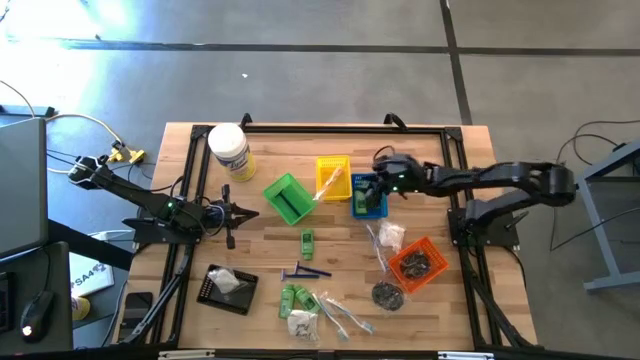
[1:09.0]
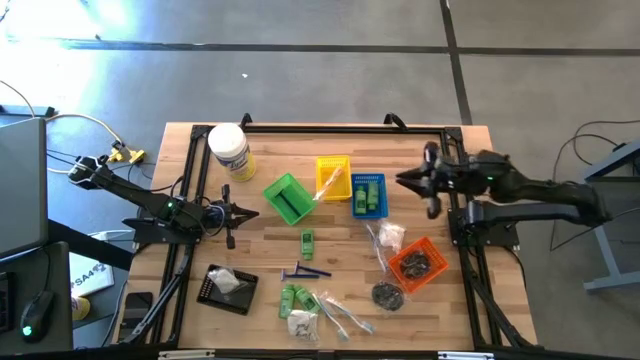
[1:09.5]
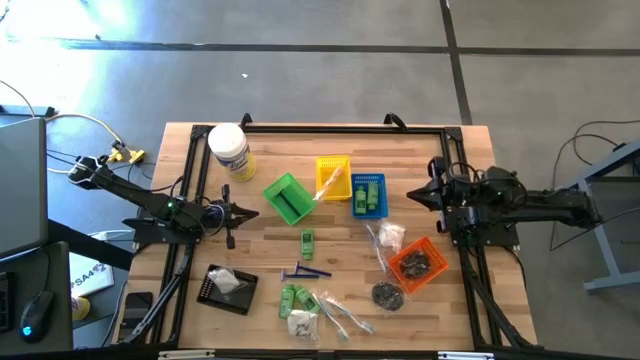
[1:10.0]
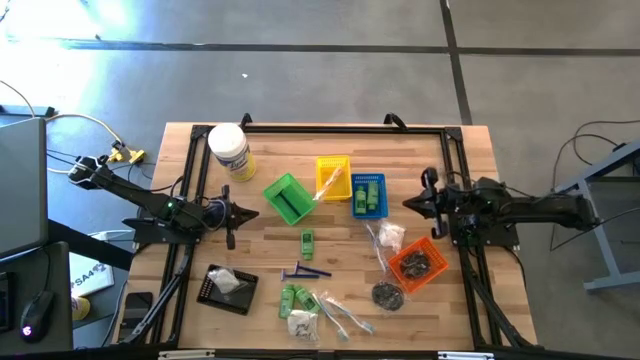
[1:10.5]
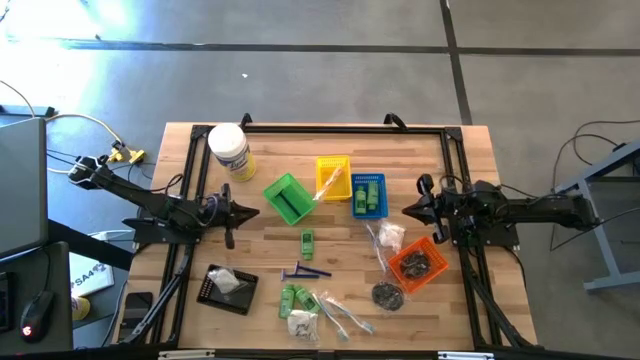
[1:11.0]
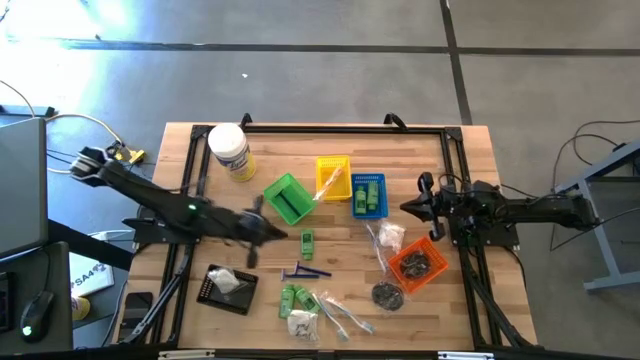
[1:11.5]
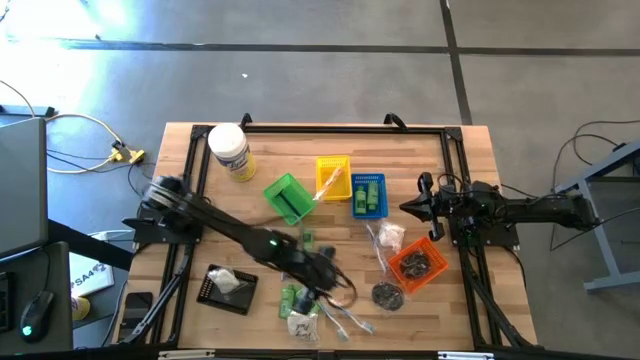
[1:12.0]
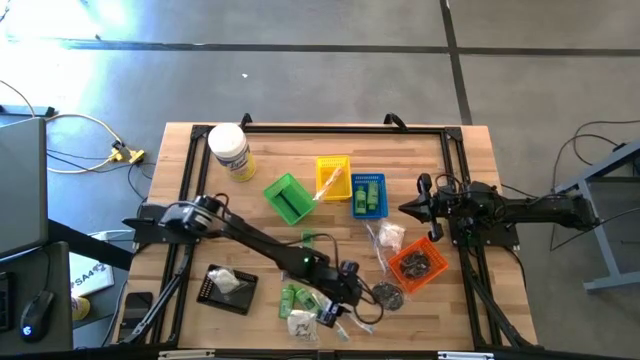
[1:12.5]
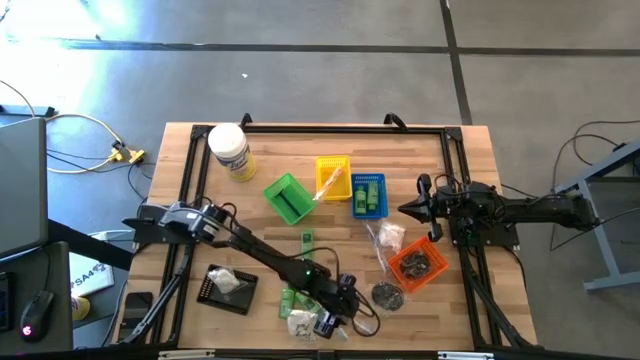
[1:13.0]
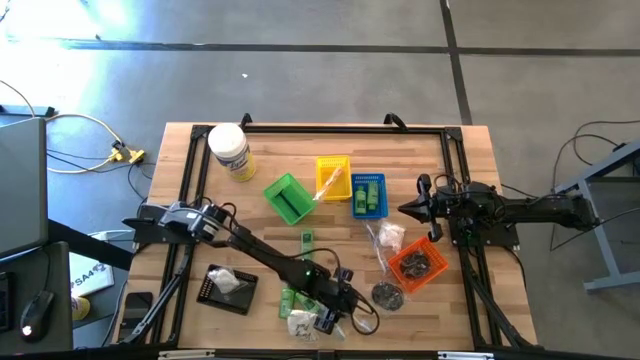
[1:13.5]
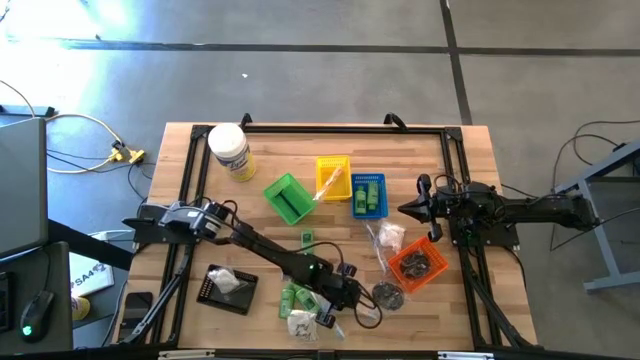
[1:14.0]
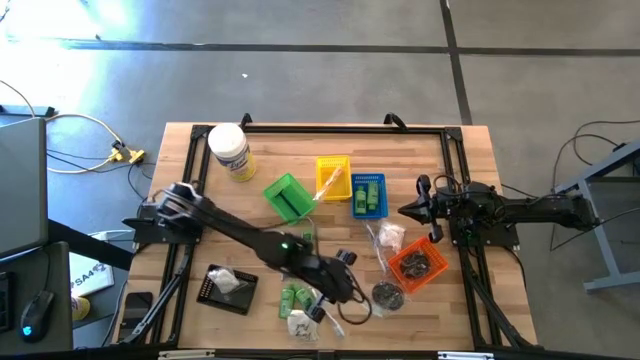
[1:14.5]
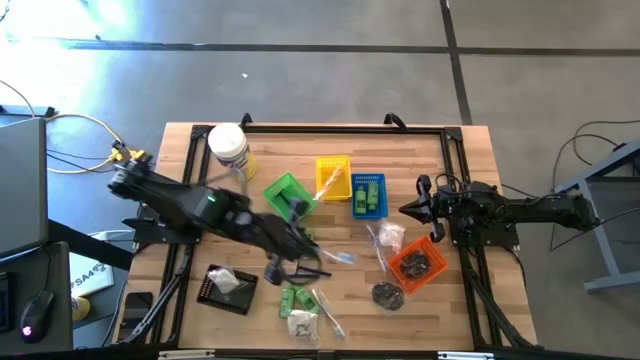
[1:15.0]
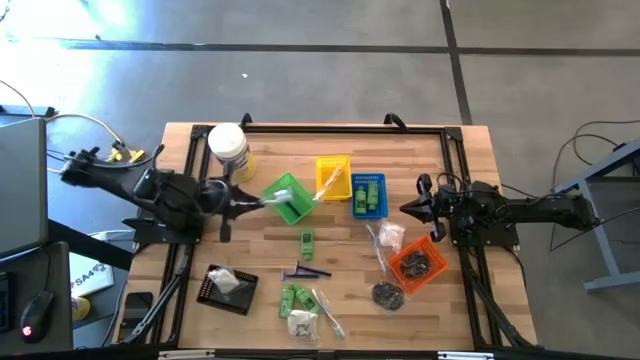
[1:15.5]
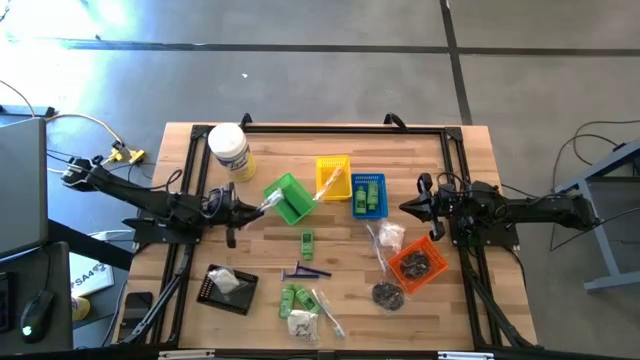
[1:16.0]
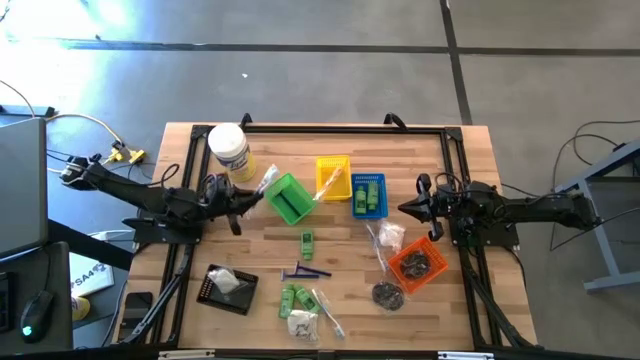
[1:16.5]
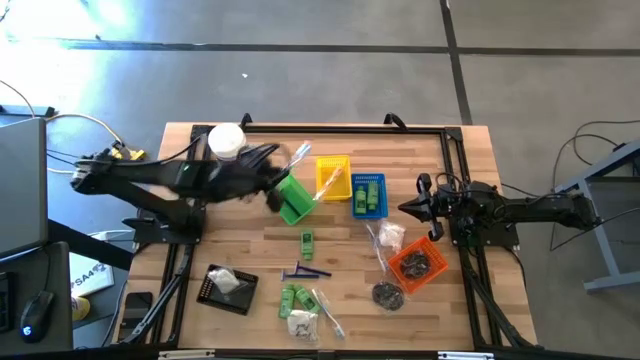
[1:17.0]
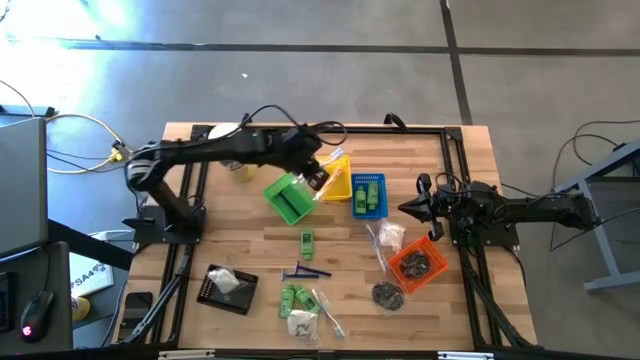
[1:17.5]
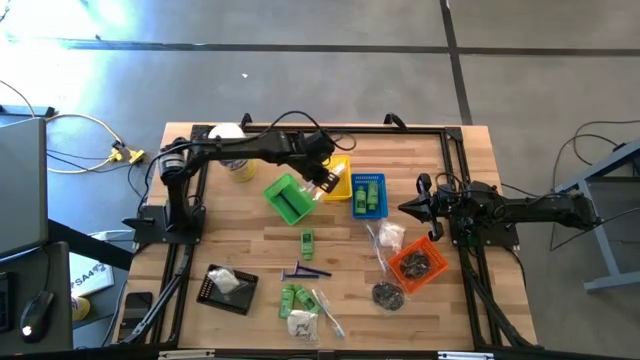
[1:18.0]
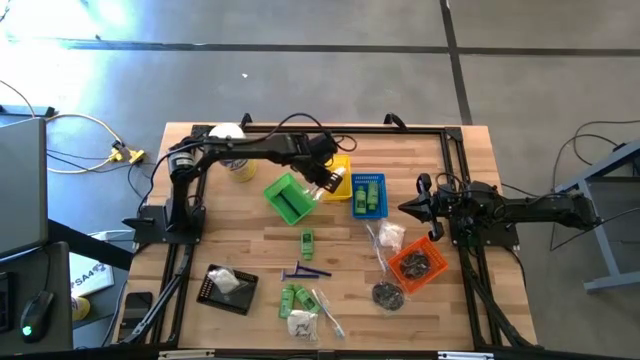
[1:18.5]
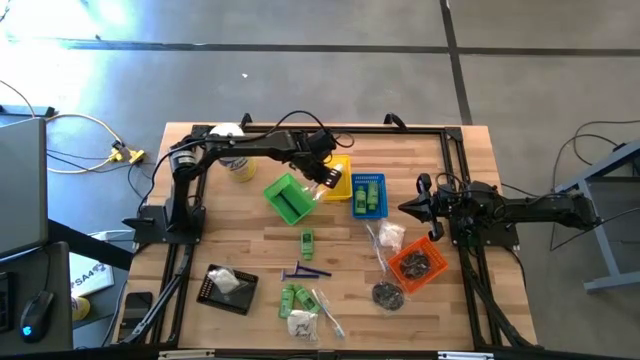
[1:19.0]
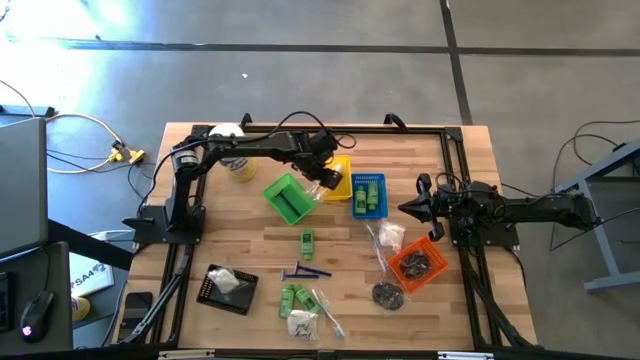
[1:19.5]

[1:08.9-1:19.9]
Task: Pick & Place Travel size toiletries
Put the blue toothbrush into the yellow basket

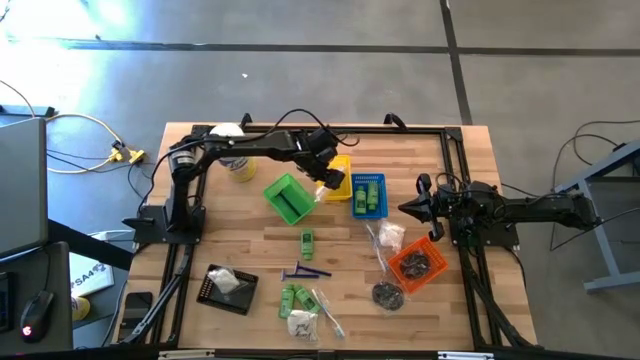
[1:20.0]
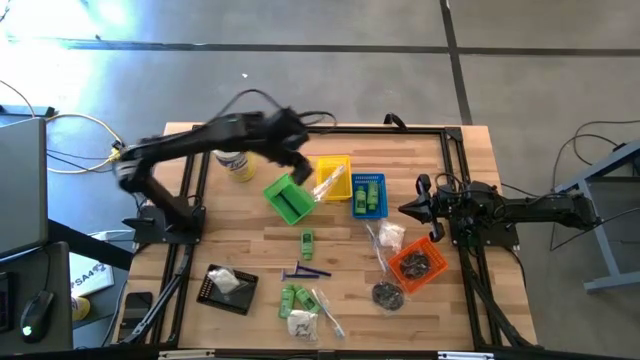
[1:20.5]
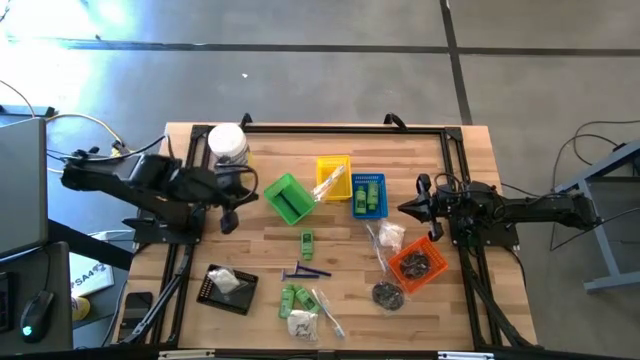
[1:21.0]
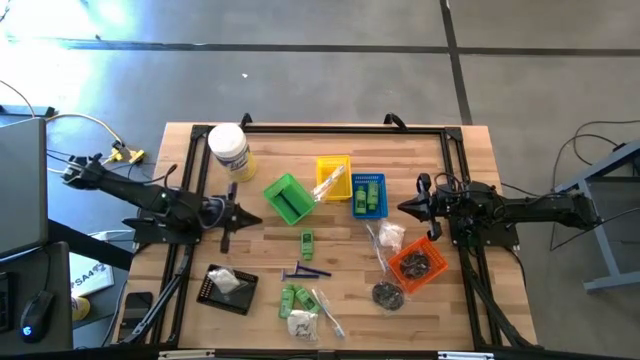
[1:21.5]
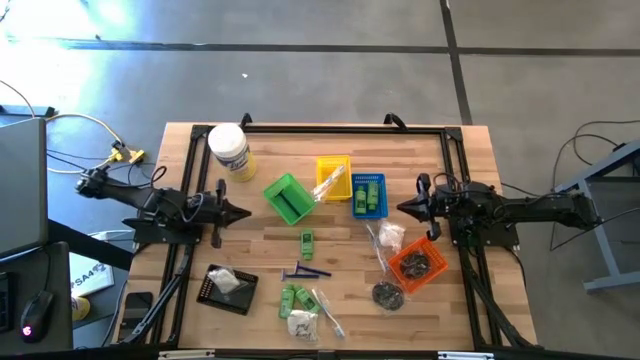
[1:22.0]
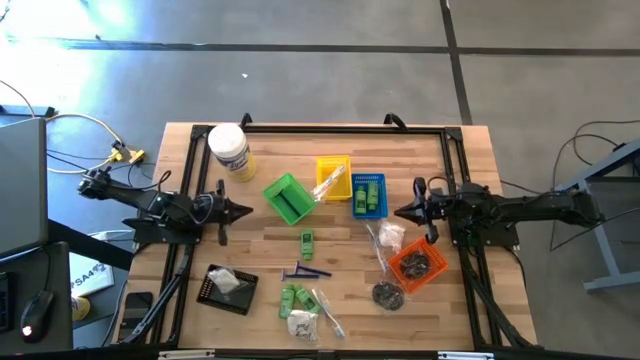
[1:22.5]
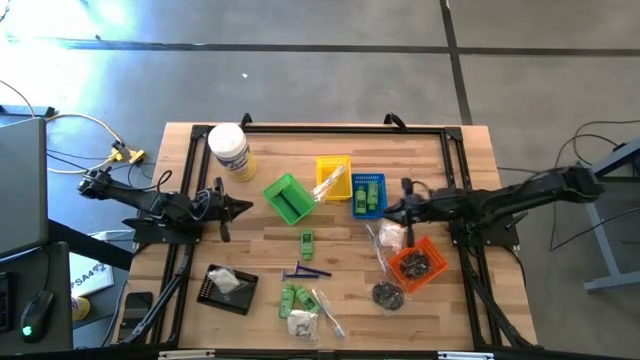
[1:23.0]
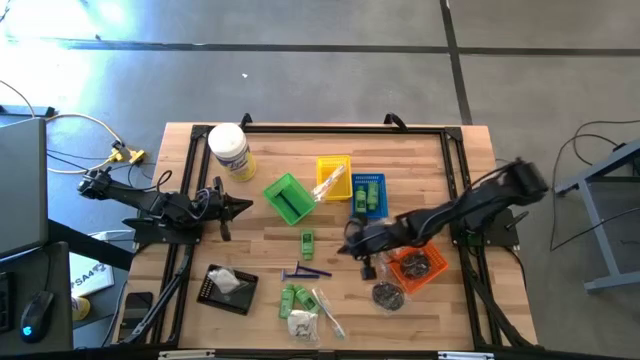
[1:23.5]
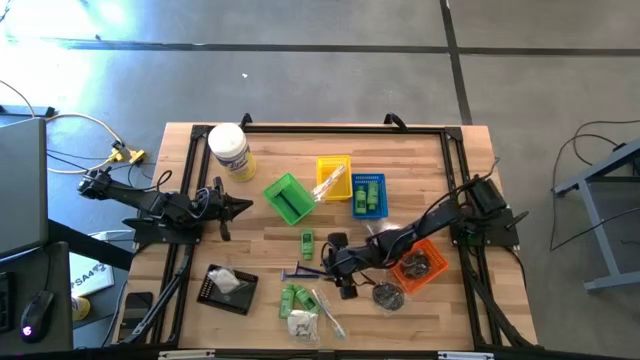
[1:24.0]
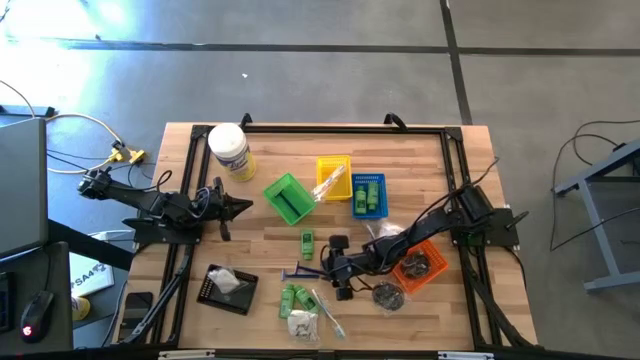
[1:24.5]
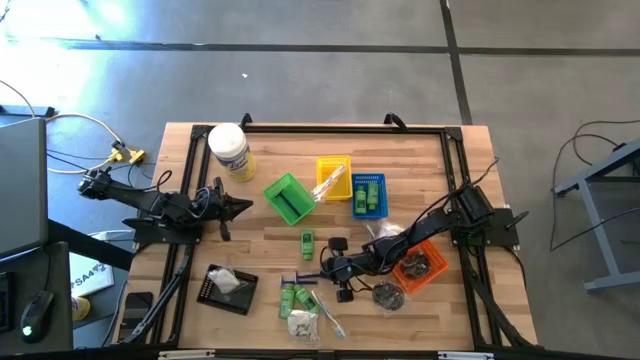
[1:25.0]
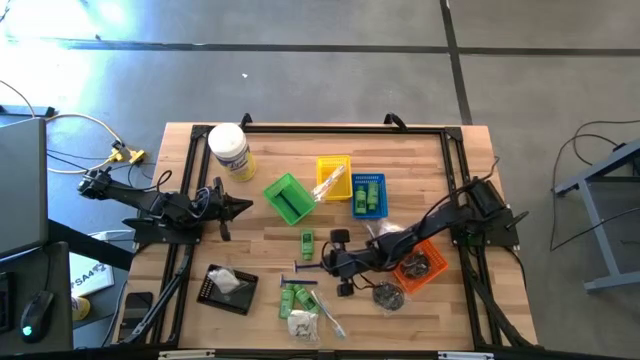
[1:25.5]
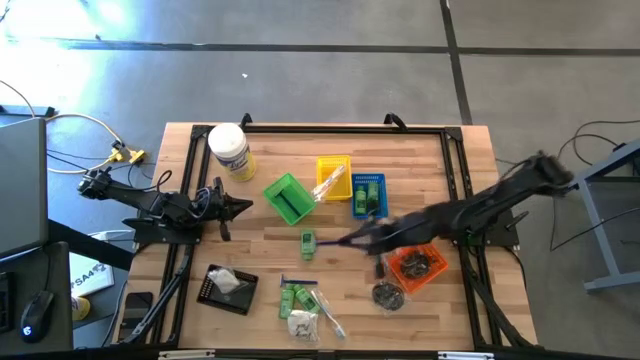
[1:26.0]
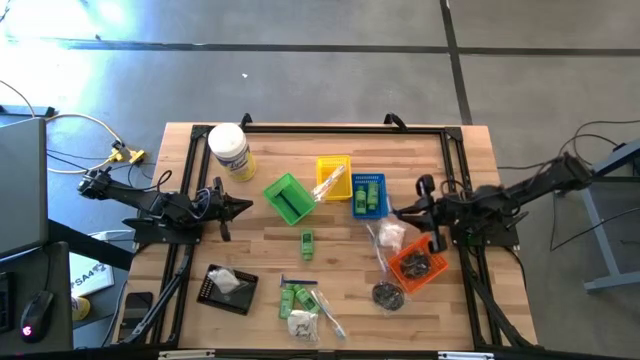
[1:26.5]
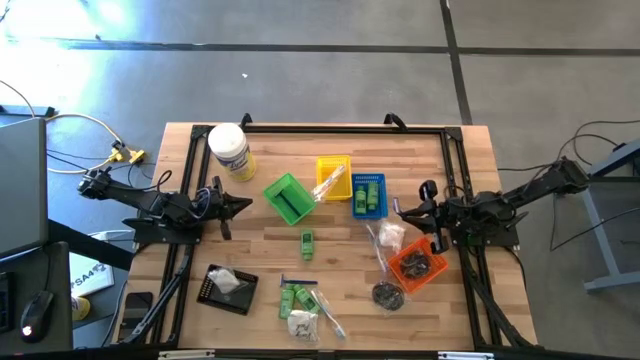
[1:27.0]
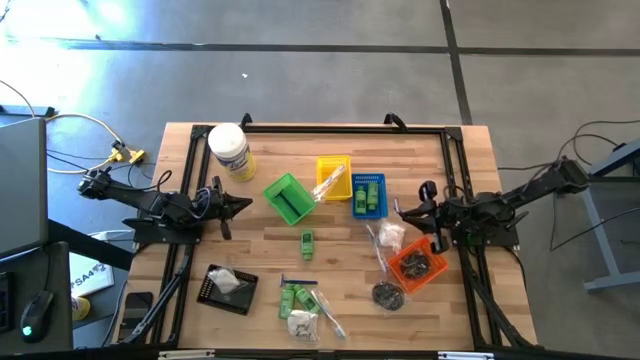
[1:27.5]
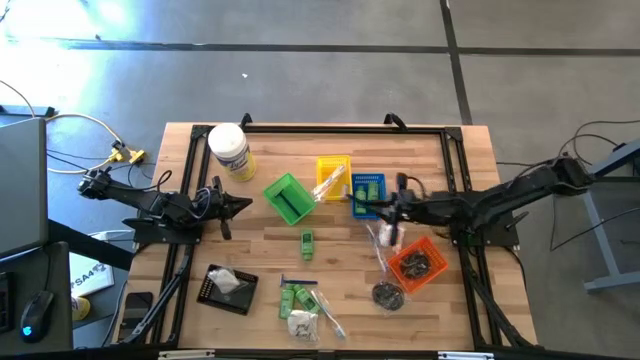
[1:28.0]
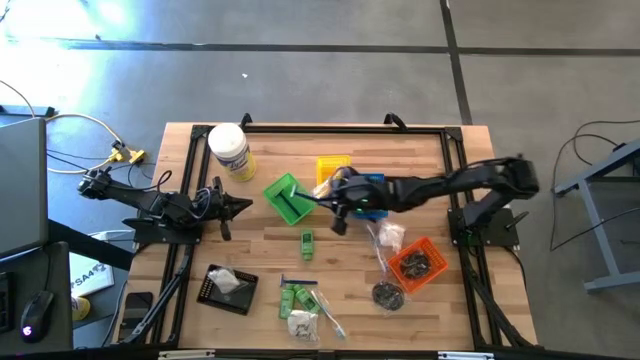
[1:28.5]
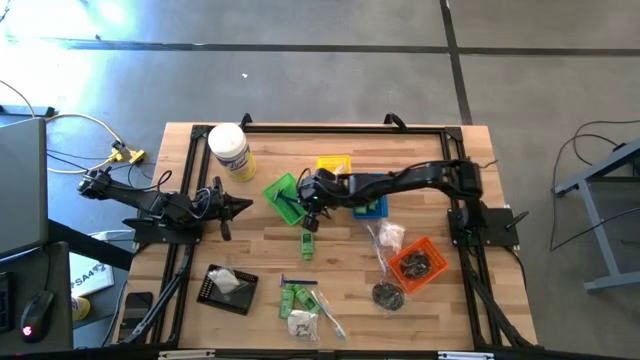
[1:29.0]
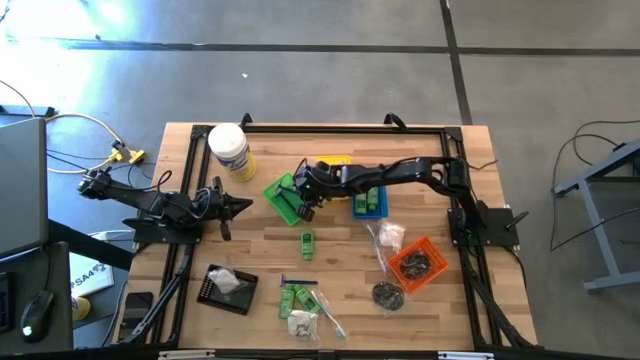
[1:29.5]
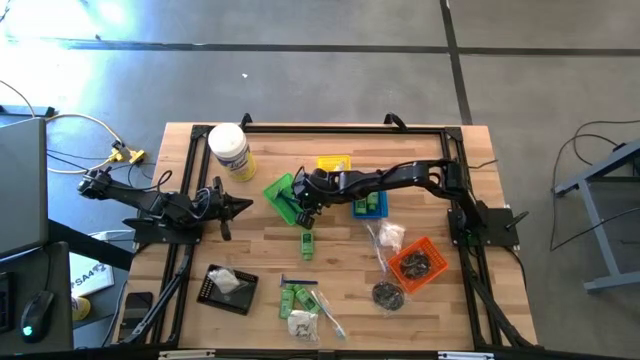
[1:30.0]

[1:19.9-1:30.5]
Put the blue razor into the green basket
